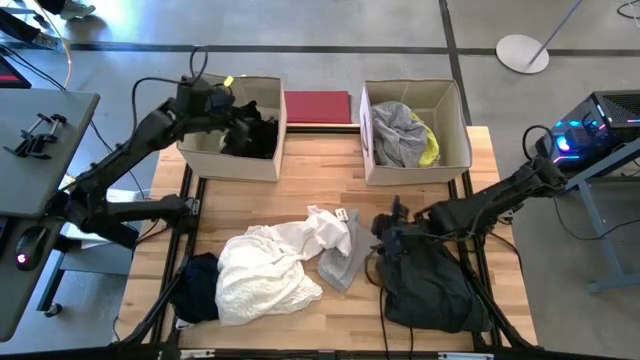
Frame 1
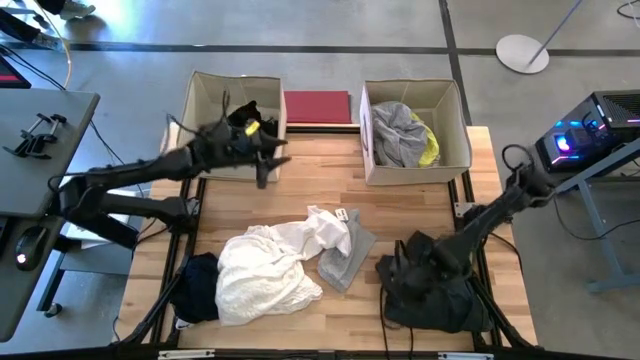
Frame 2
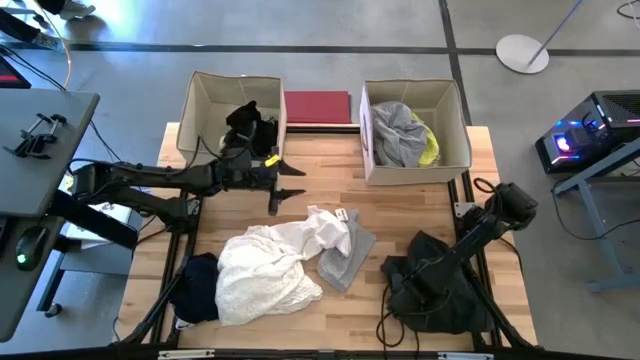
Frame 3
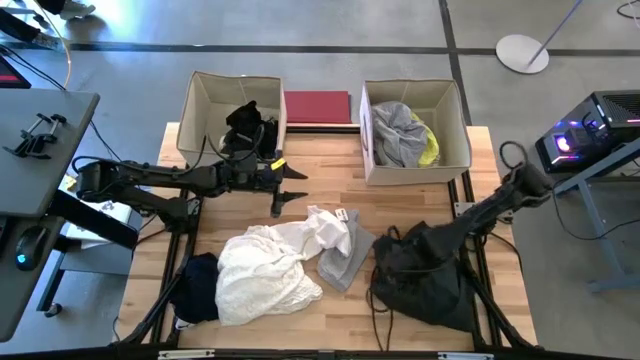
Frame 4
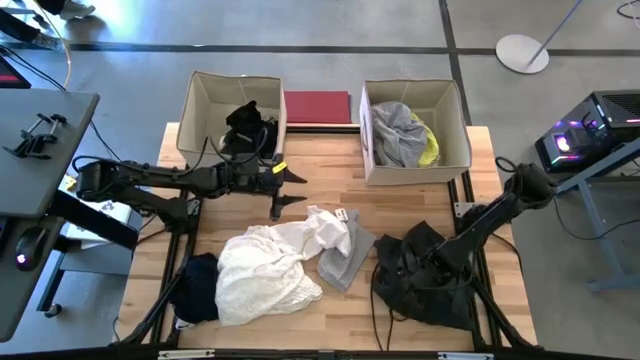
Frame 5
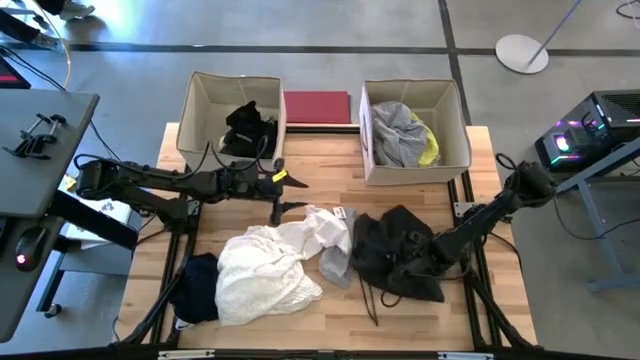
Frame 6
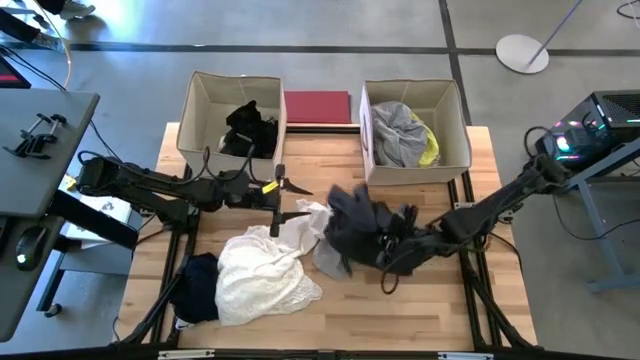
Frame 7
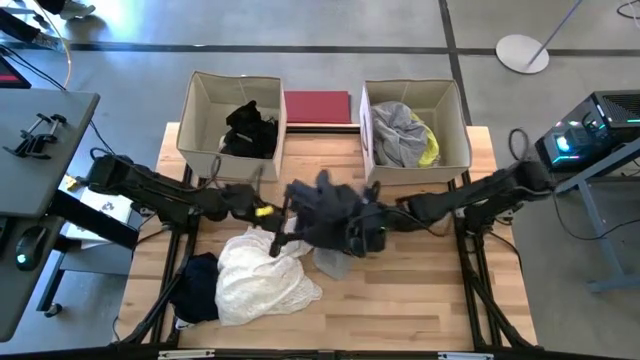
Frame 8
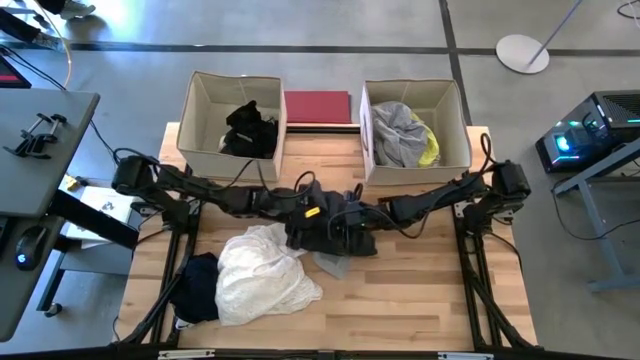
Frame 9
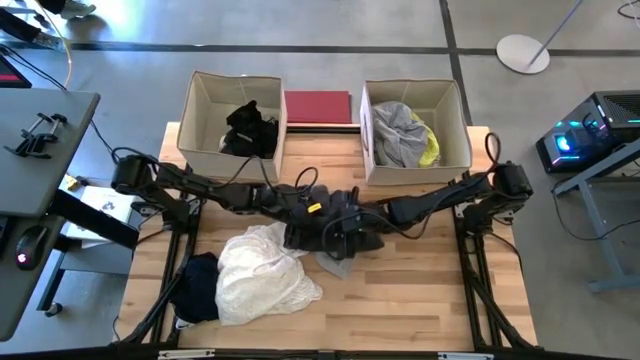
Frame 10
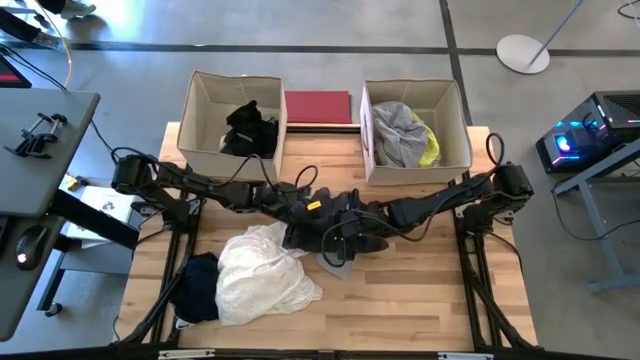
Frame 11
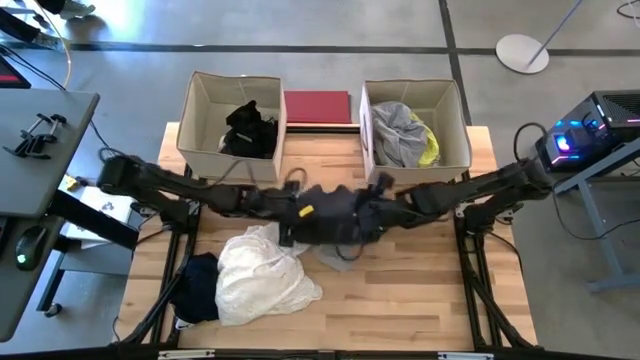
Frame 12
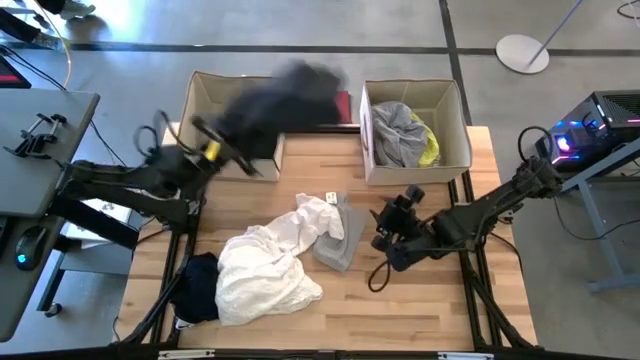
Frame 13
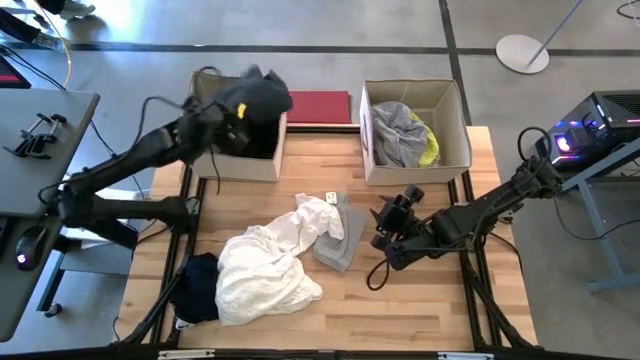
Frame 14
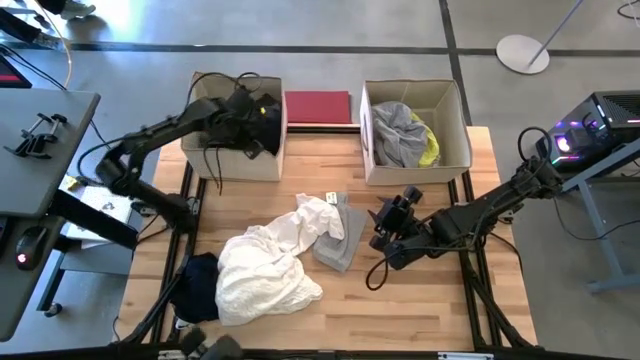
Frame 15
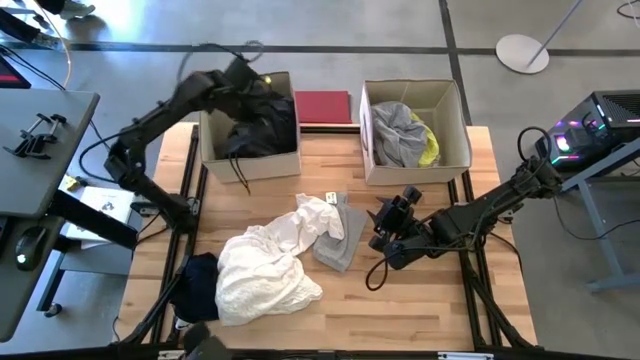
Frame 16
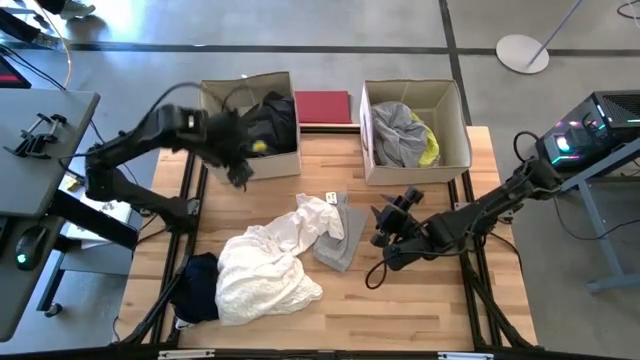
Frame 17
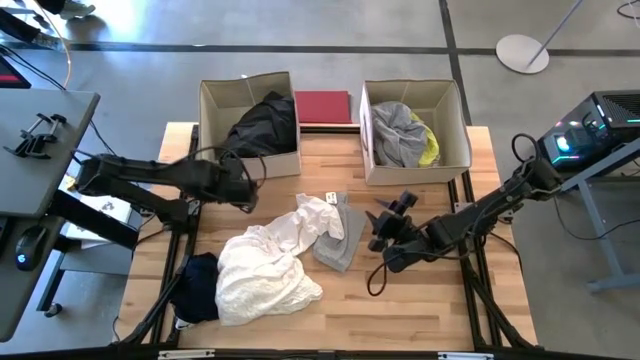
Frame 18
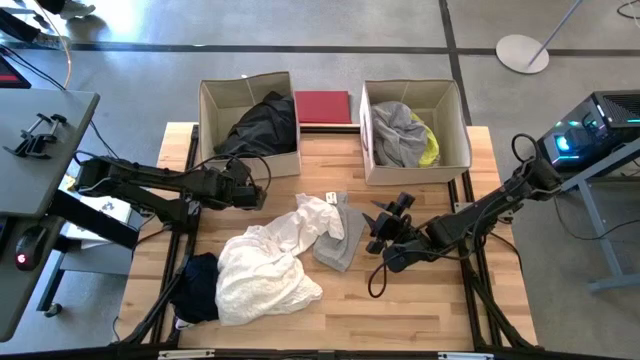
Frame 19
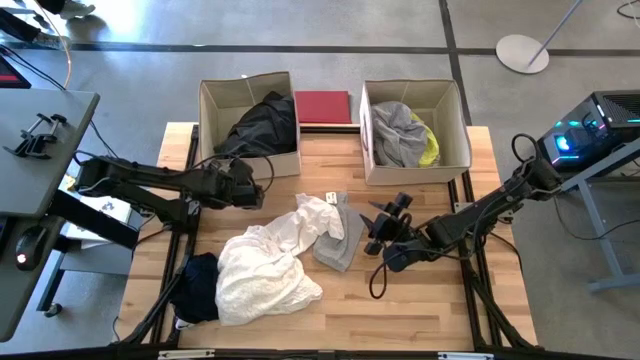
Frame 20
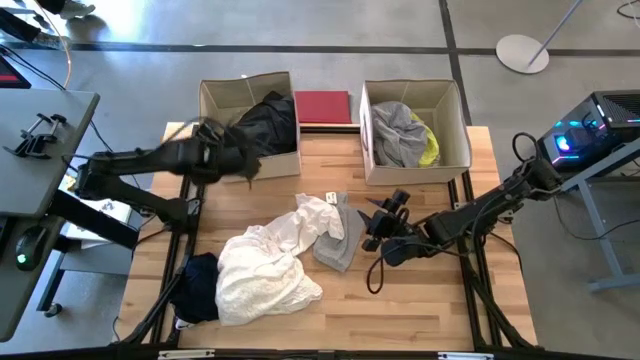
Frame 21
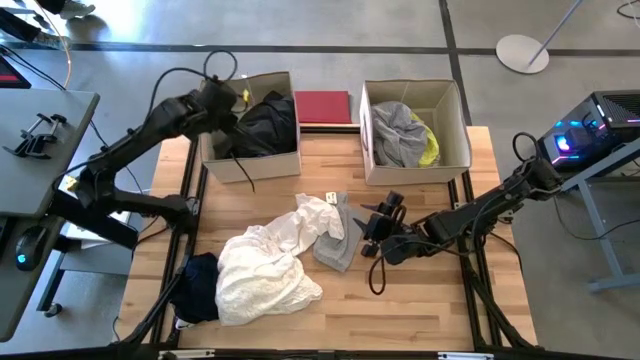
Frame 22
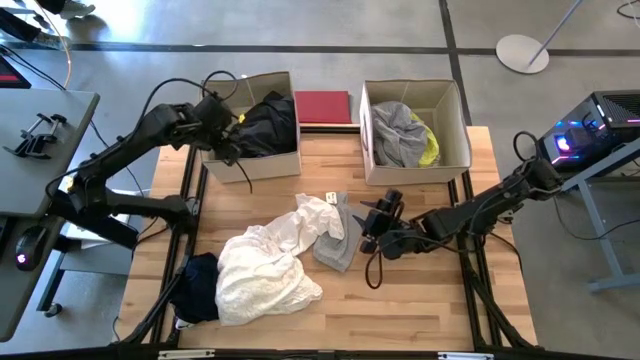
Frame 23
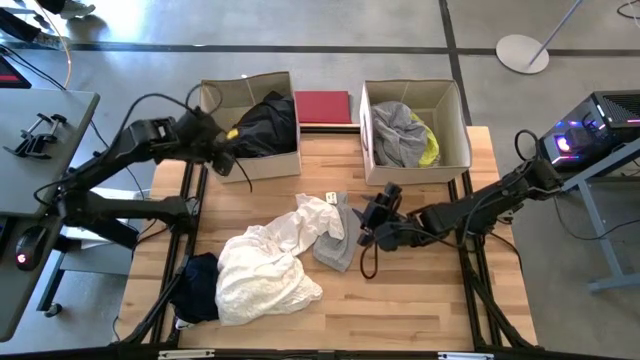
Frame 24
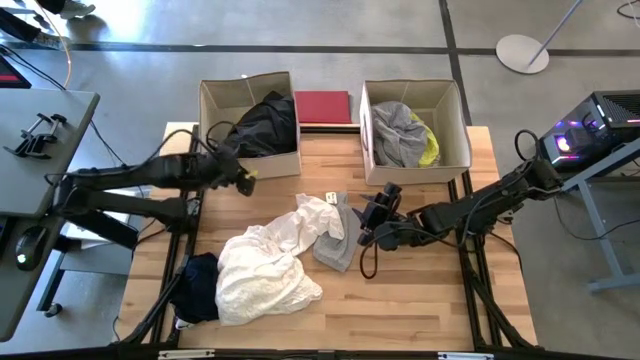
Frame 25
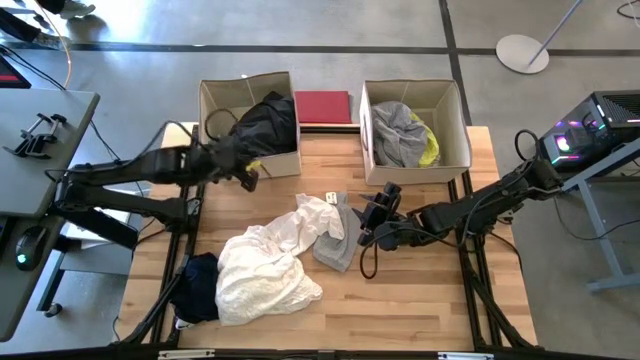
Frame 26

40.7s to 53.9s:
Task: Sort clothes
Put the black cloth into the left laundry organizer

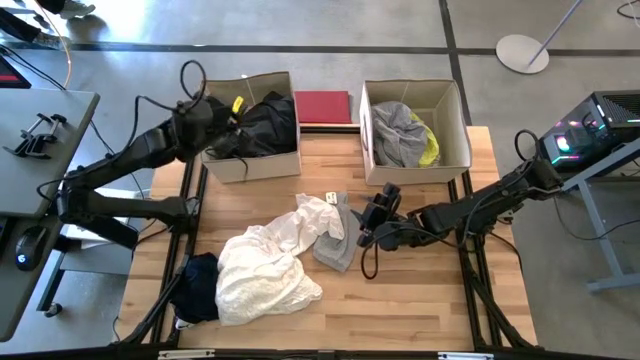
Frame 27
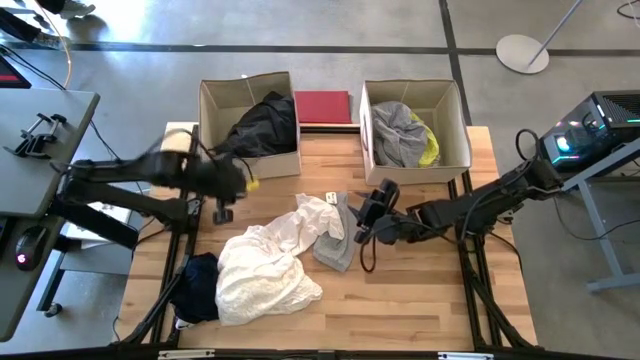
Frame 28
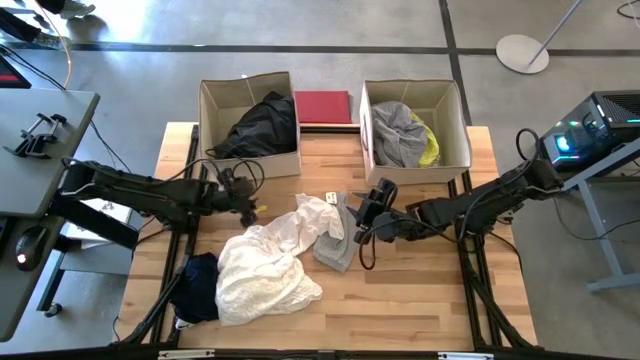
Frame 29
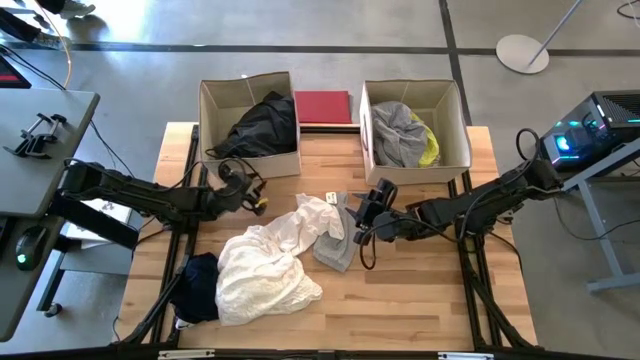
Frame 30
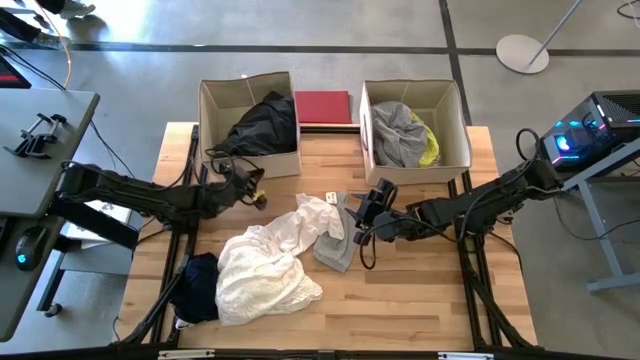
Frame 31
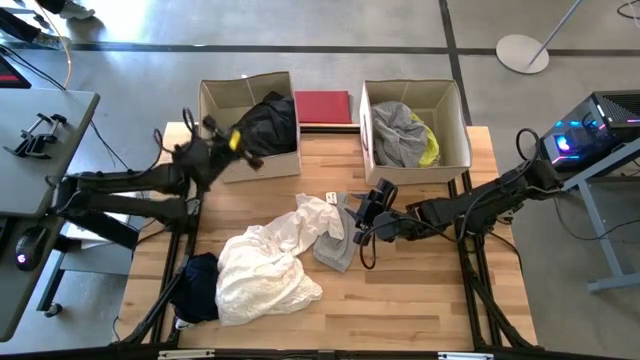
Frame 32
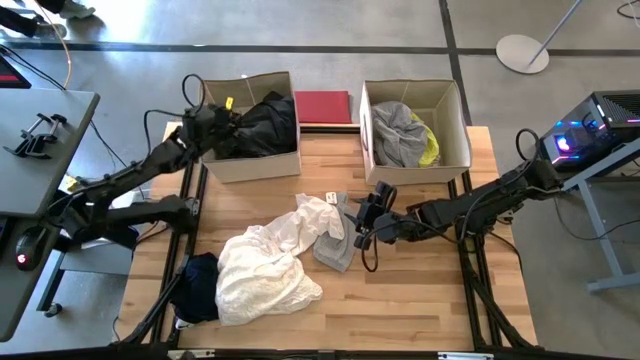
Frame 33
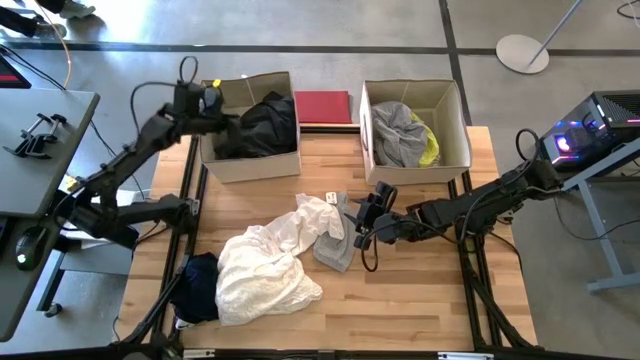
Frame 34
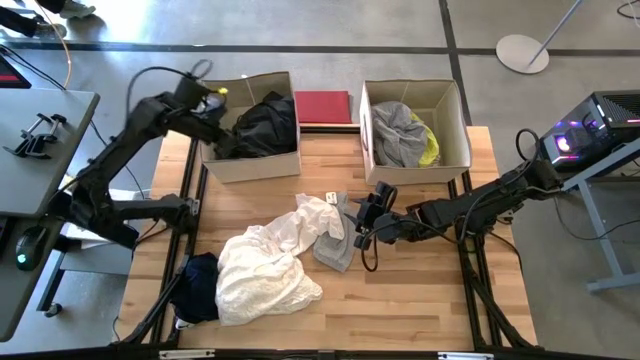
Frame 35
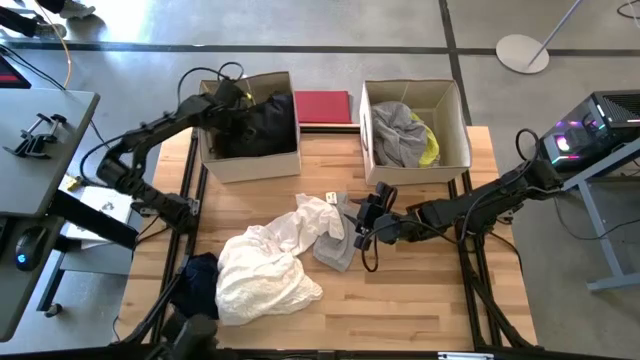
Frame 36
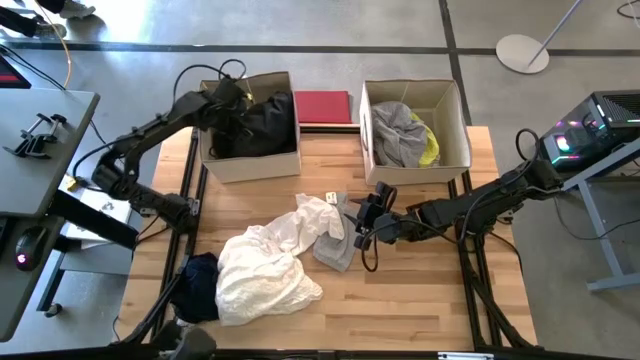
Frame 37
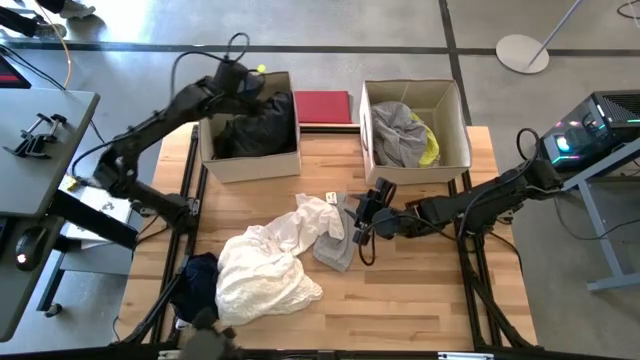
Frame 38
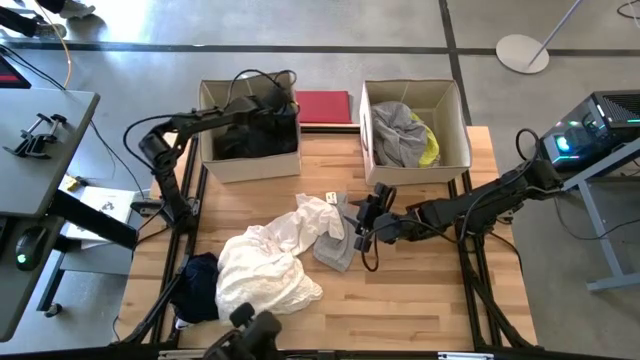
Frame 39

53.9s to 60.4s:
Put the black cloth into the left laundry organizer

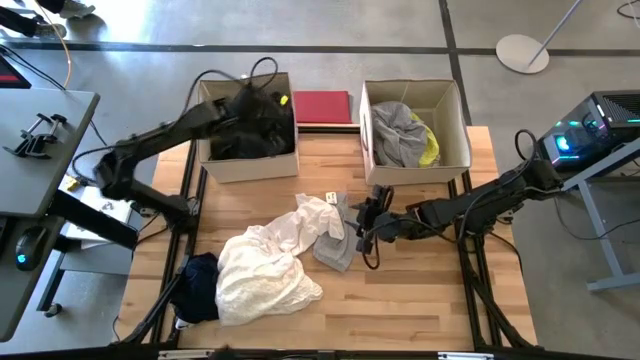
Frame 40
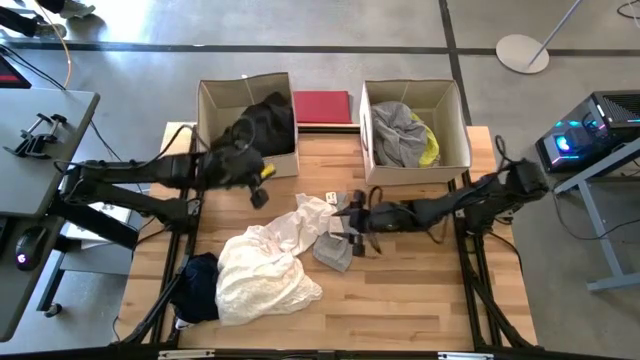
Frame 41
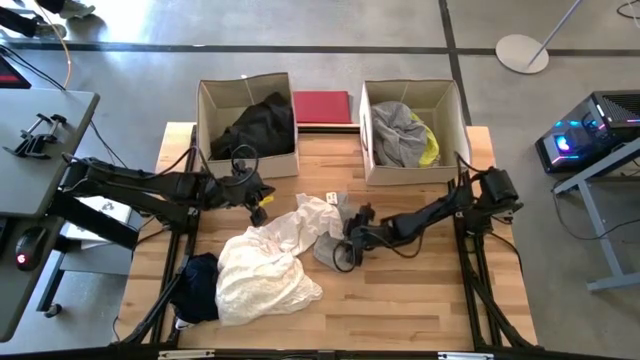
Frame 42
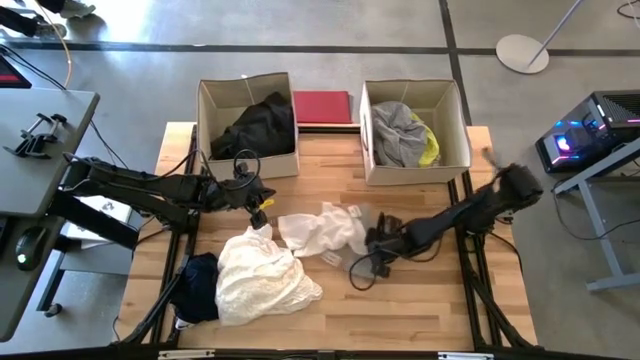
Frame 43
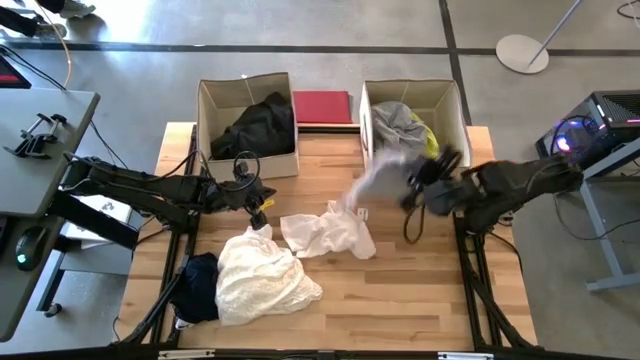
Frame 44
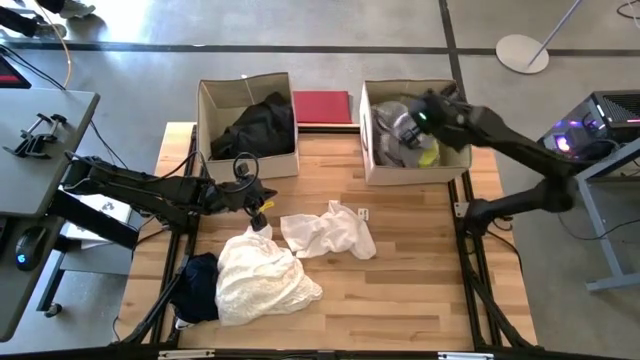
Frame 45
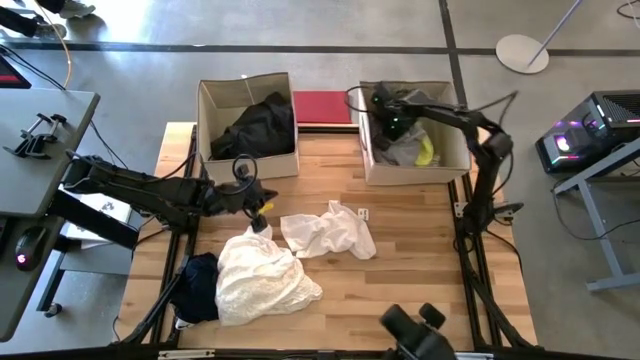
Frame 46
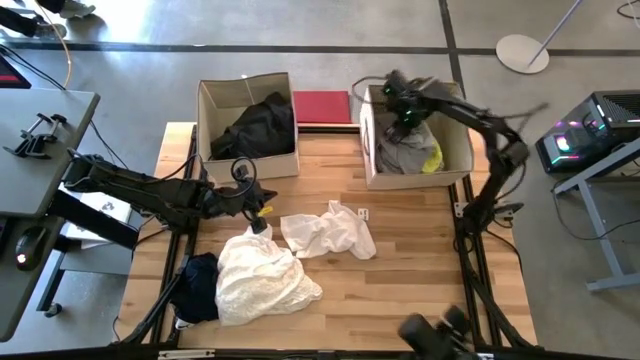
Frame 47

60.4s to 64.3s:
Put the gray cloth into the right laundry organizer
